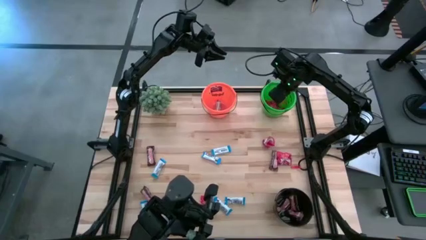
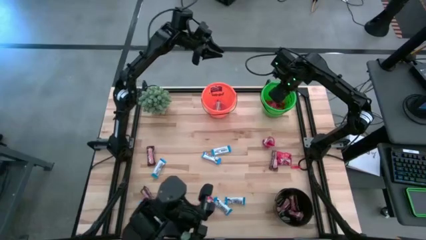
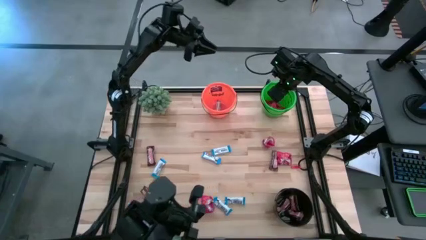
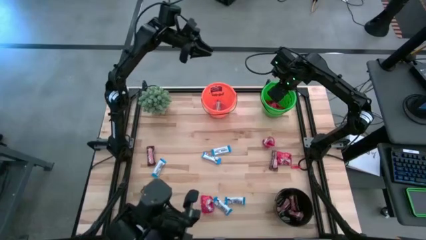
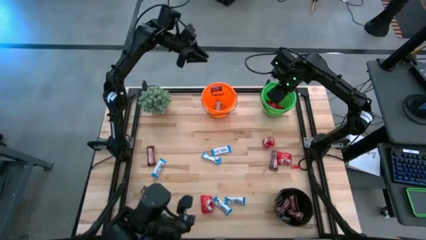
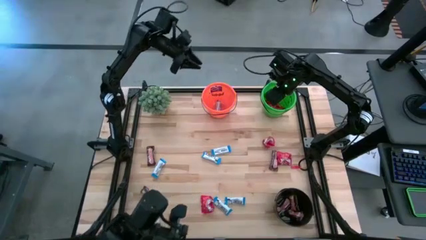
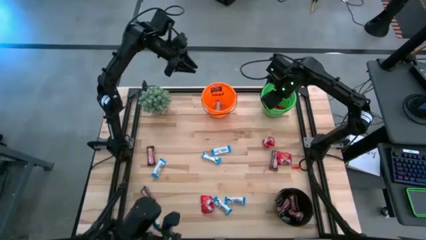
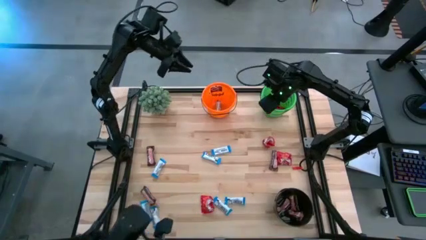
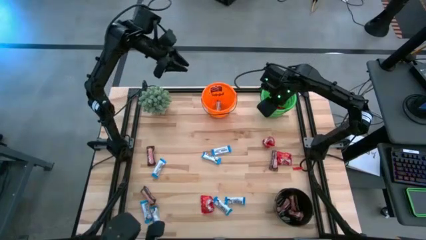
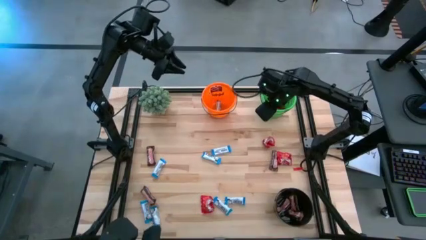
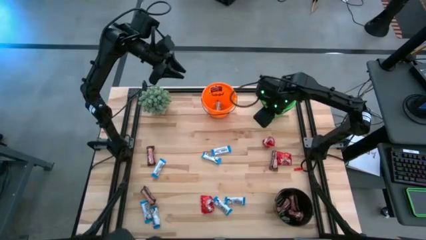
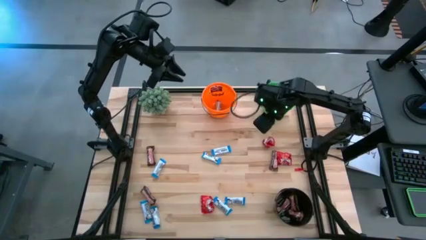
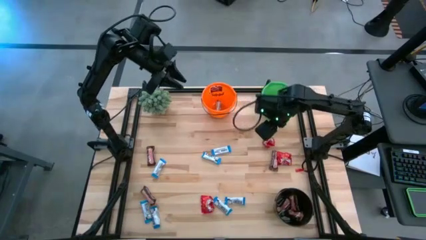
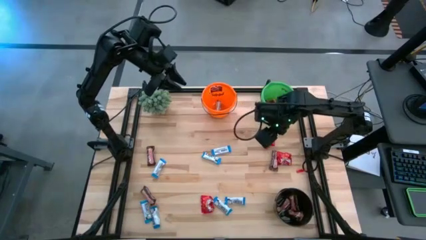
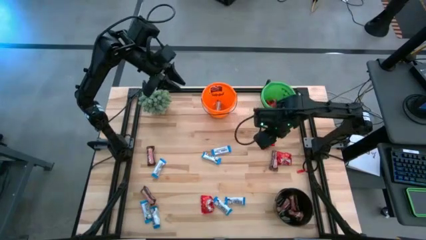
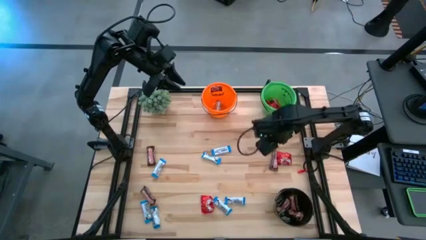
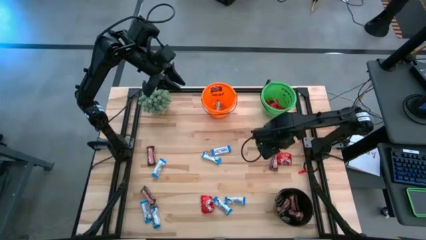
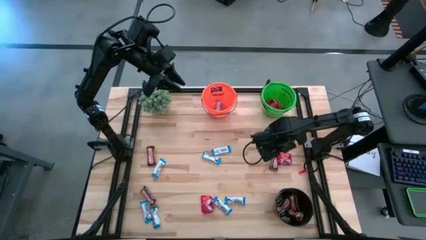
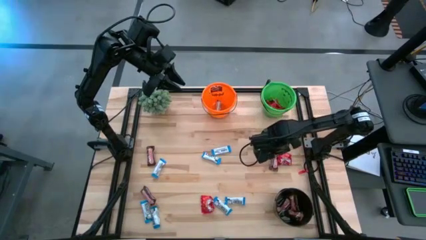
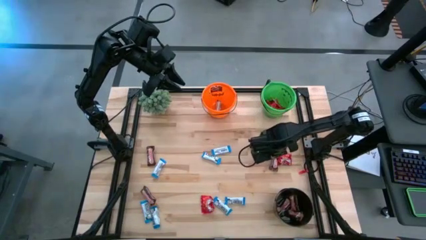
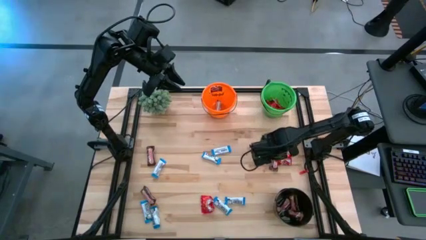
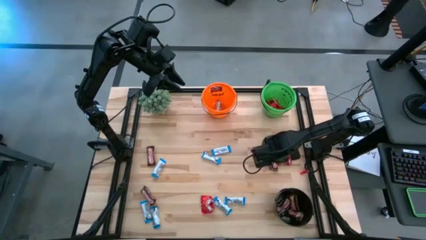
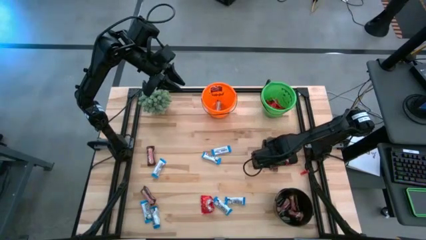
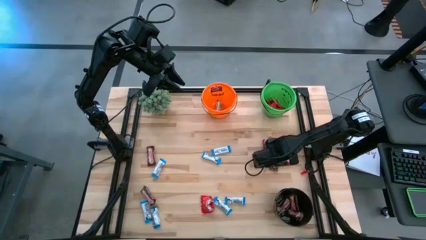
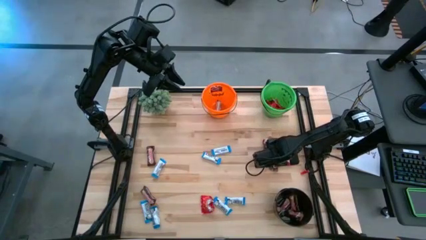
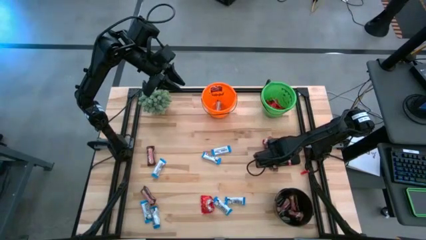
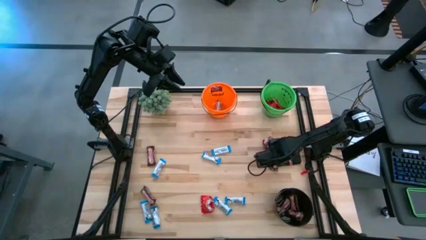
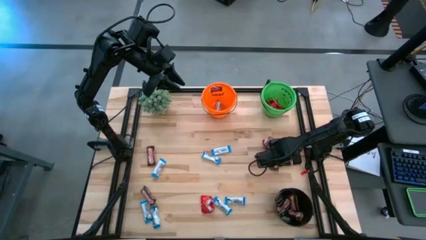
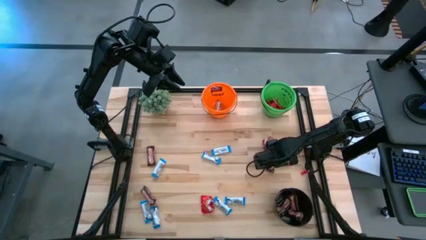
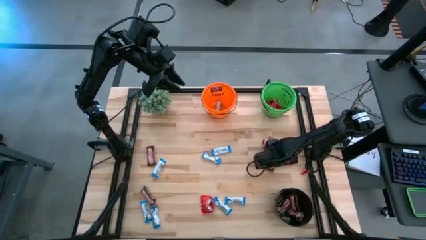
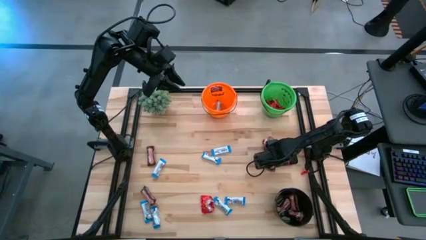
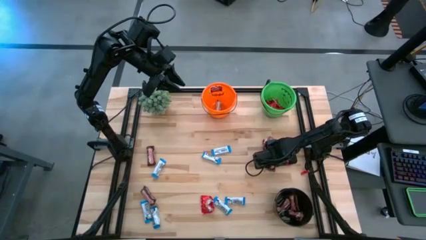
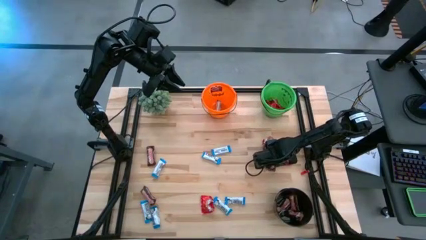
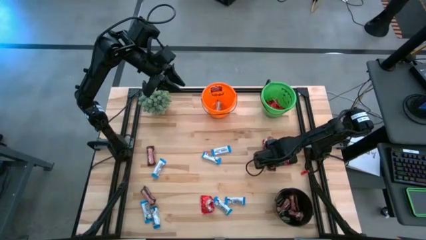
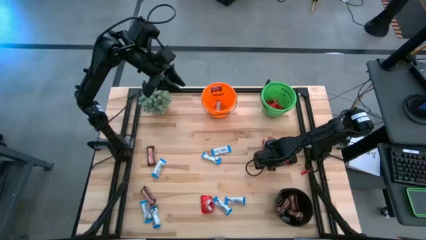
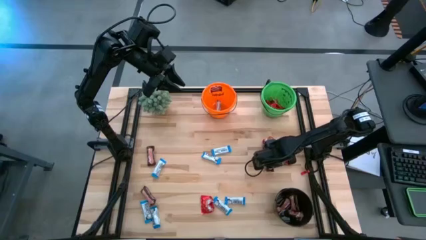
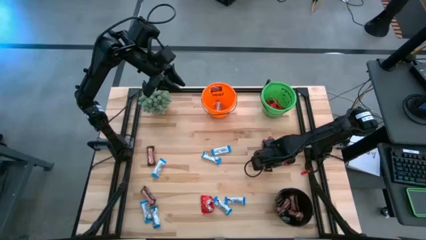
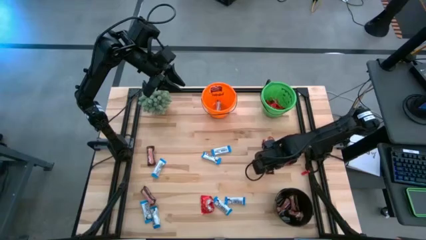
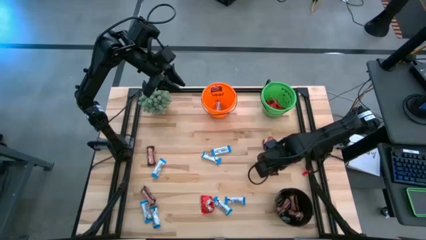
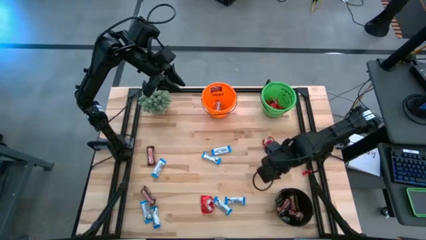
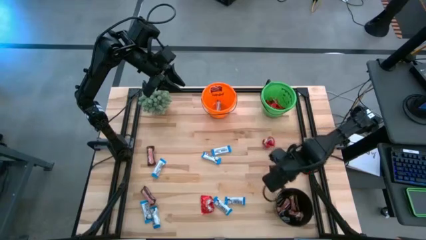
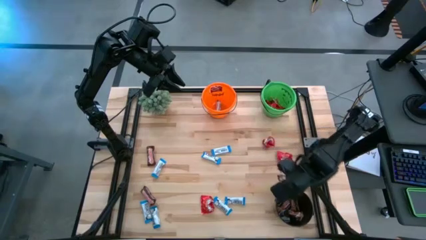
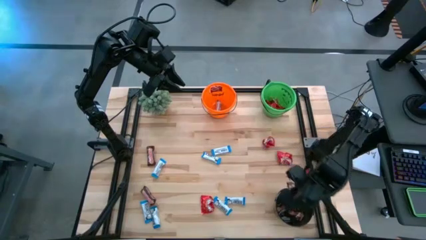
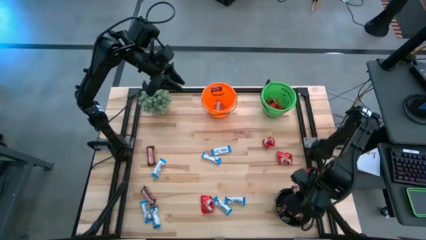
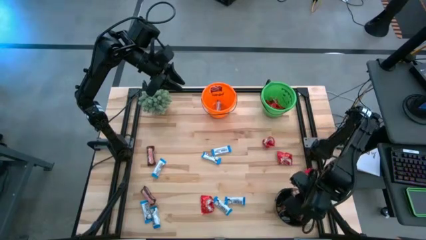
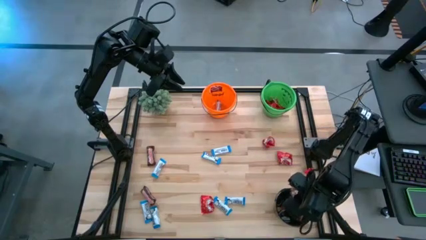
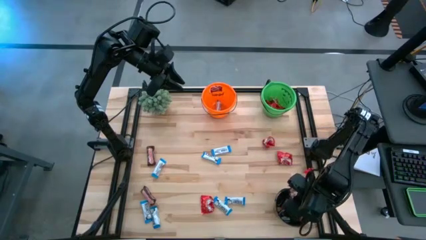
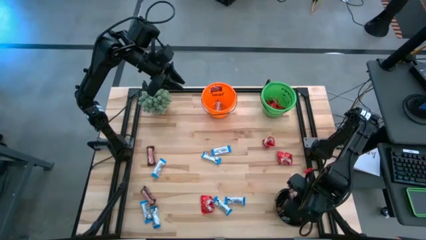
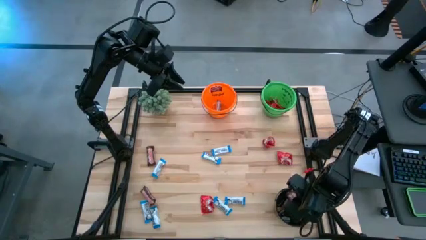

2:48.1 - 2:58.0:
Task: Organize candy in baskets
Put the brown chocolate bar into the black bucket

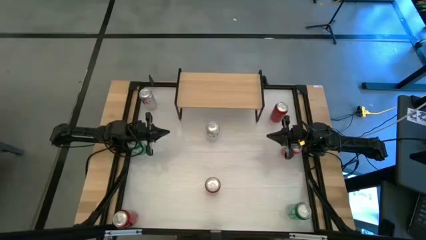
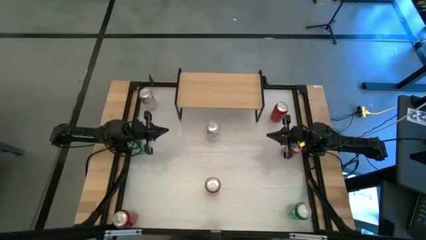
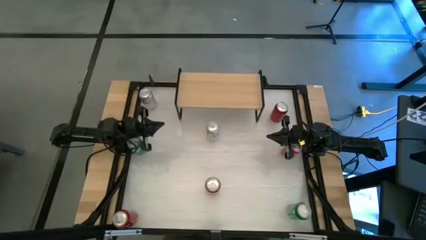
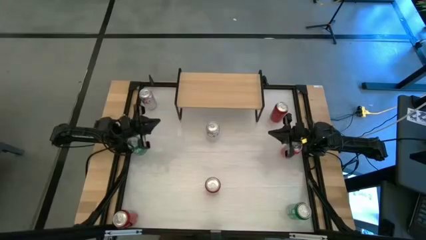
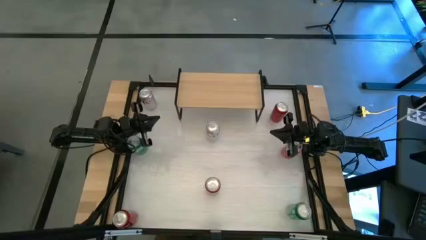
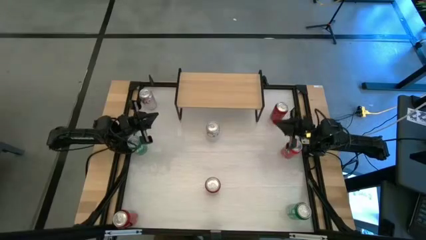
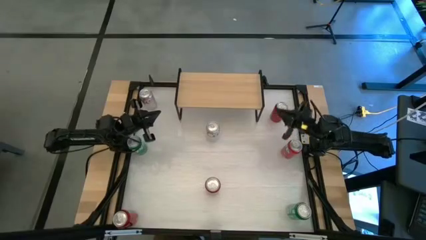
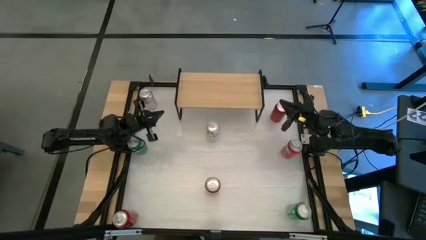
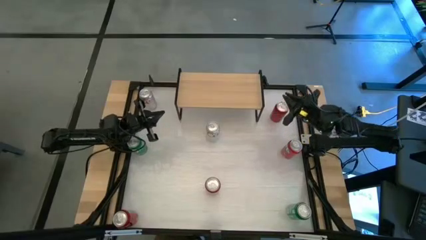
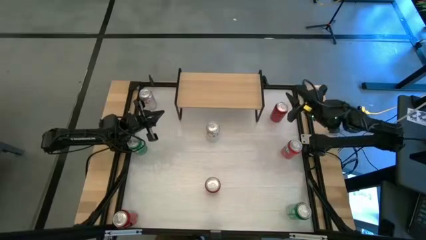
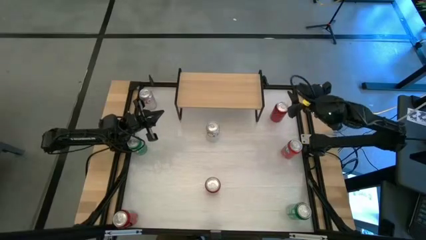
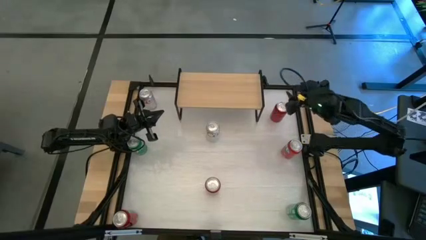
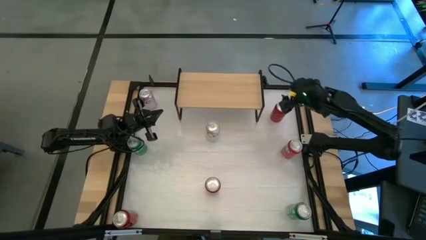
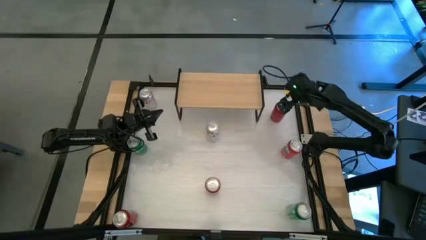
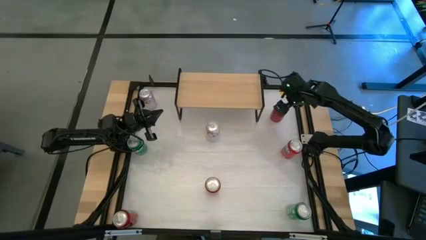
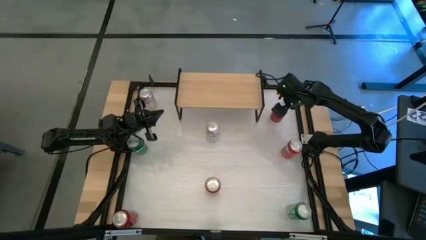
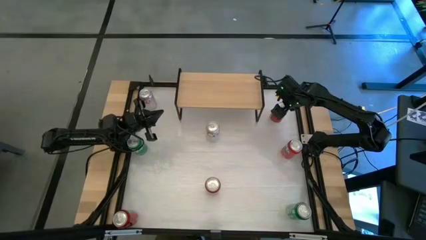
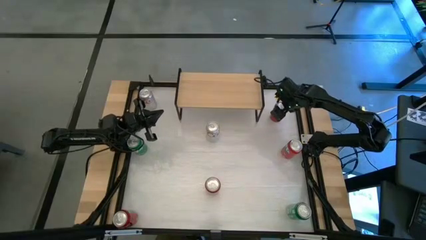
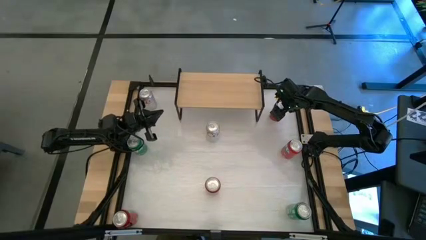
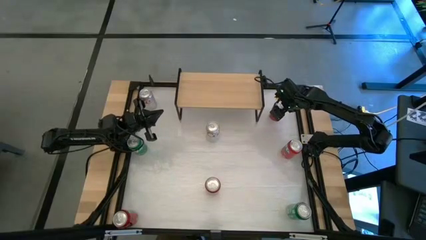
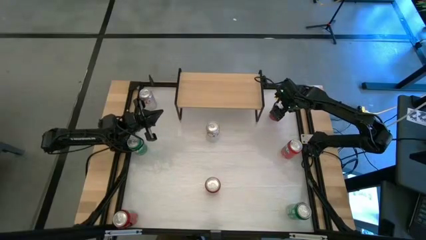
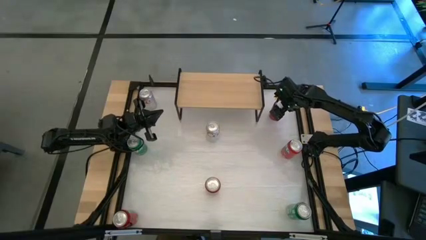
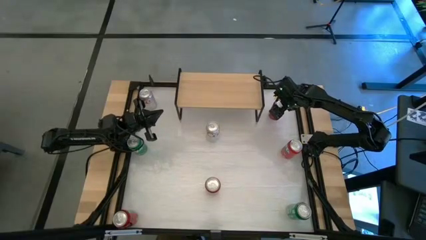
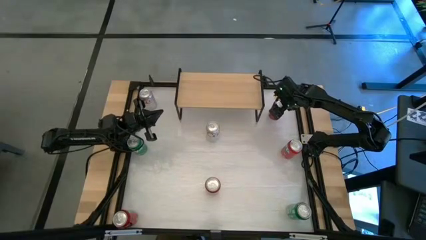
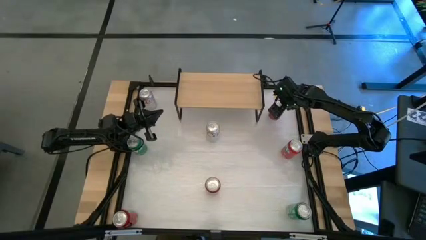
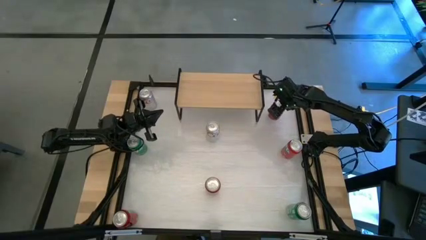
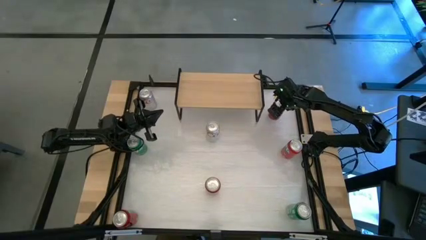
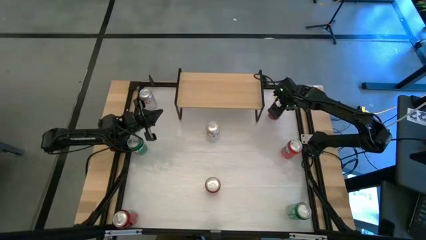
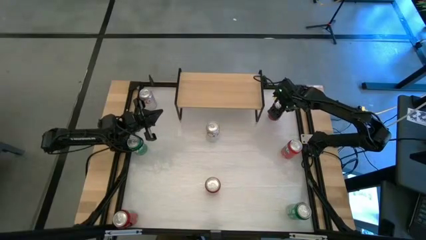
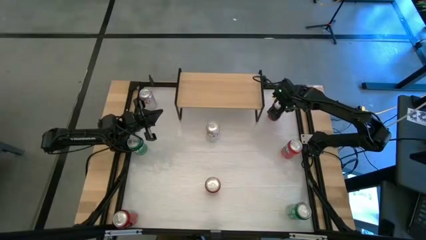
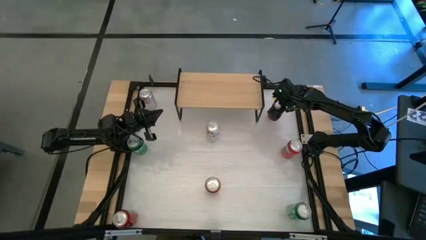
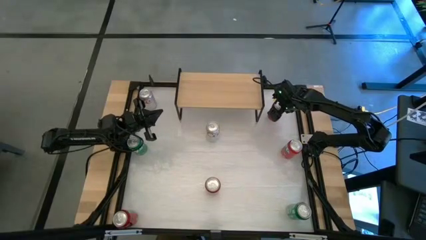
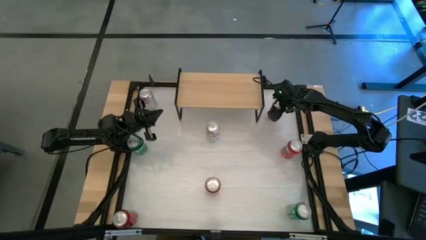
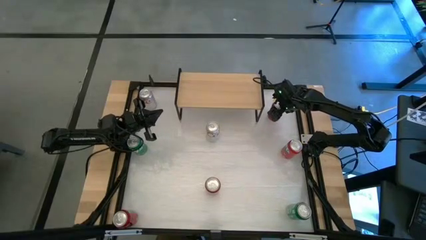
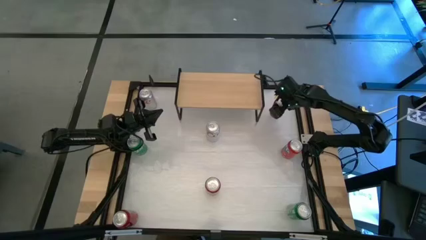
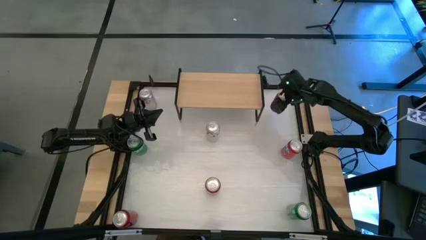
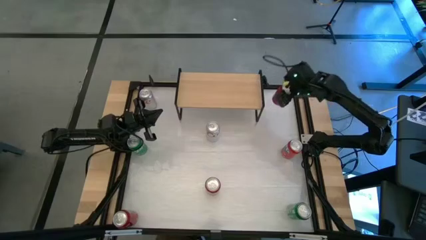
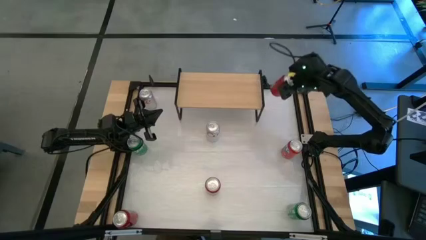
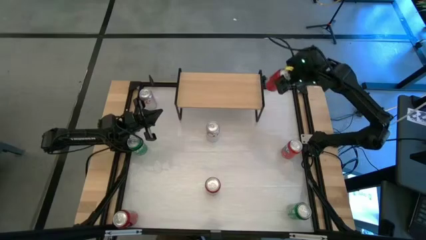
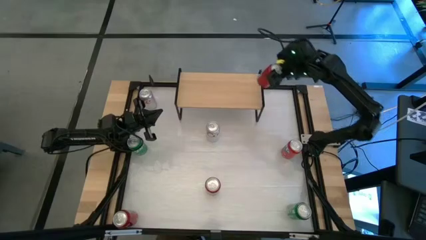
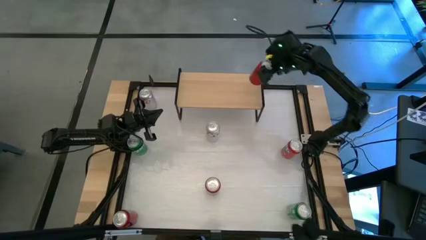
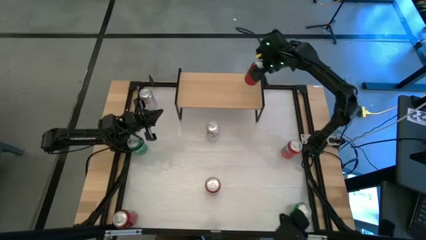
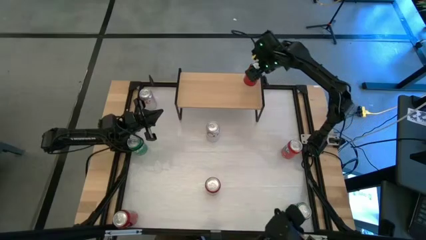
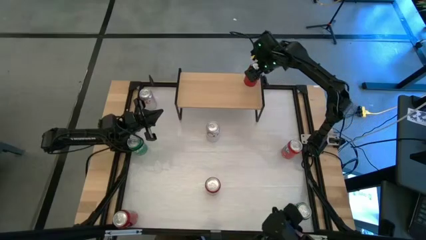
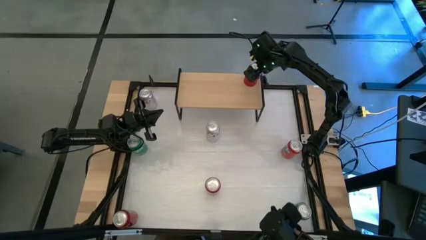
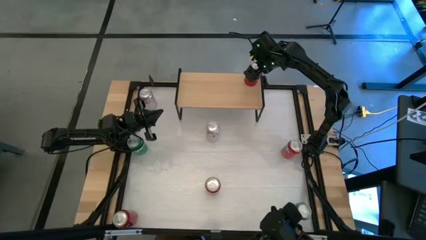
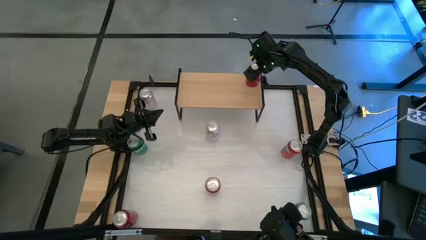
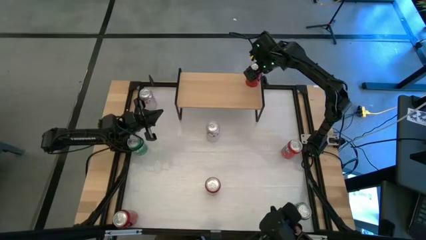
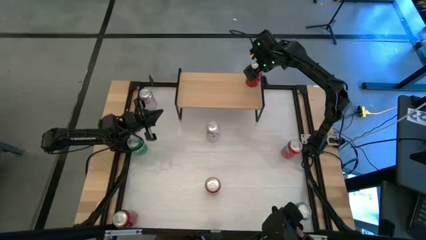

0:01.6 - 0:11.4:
Task: Place canned beverage on shelf
Put the top red soda can on the shelf
